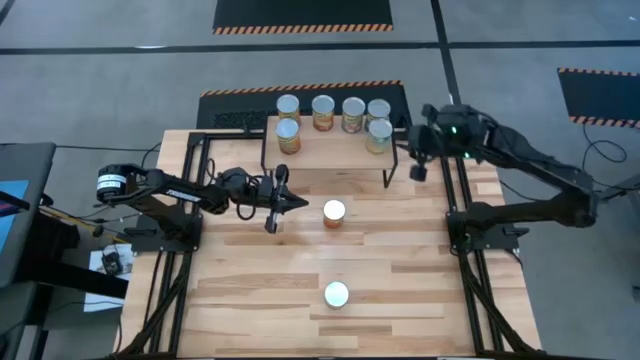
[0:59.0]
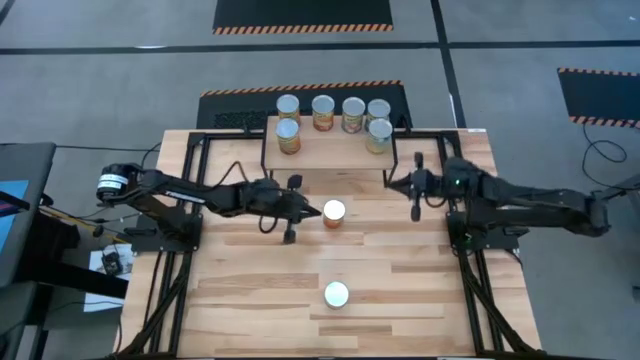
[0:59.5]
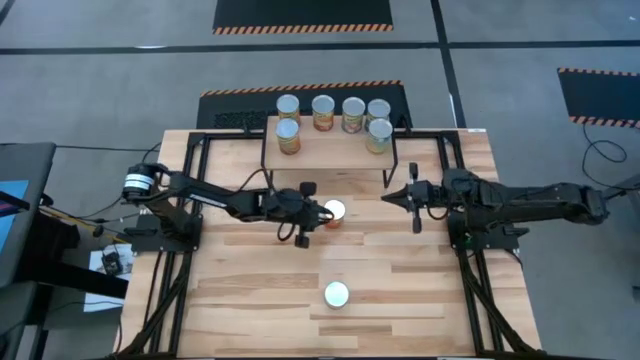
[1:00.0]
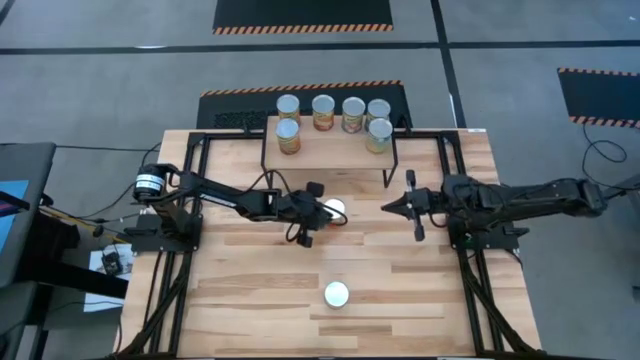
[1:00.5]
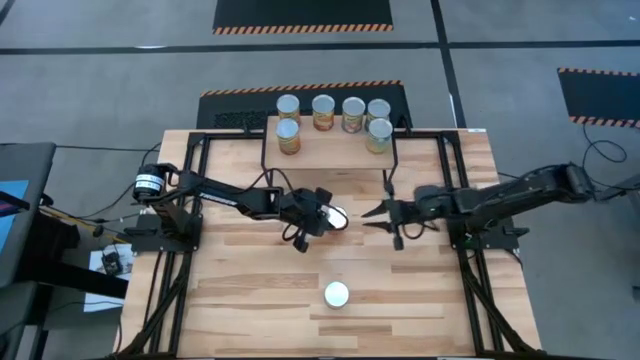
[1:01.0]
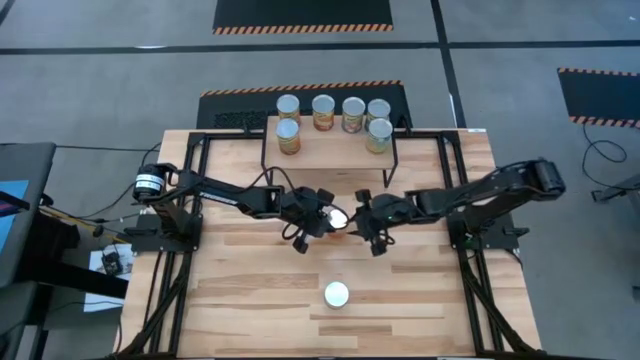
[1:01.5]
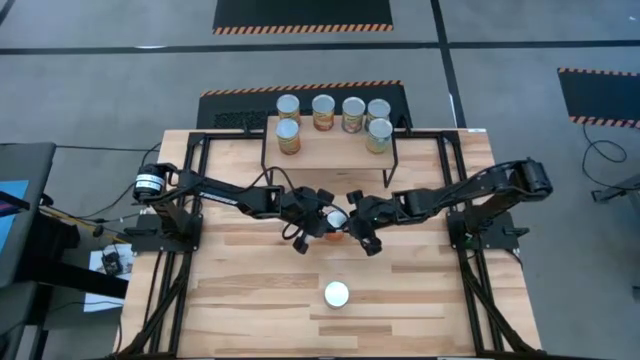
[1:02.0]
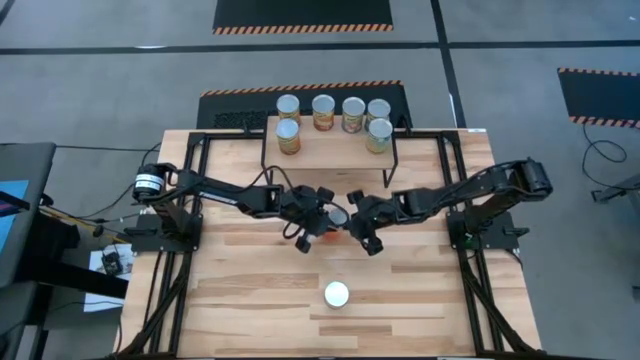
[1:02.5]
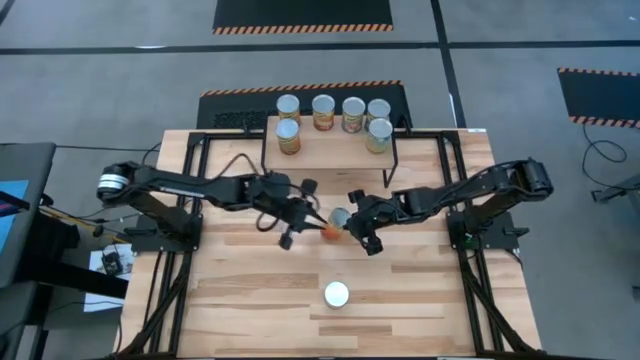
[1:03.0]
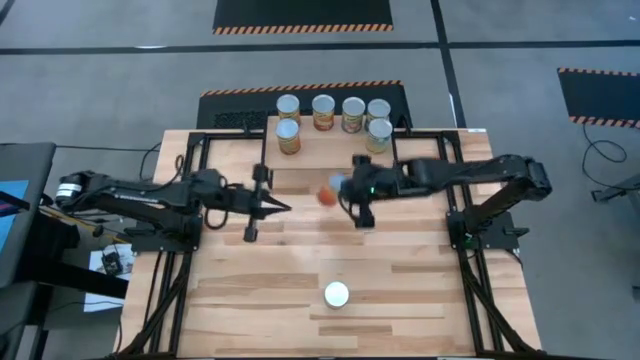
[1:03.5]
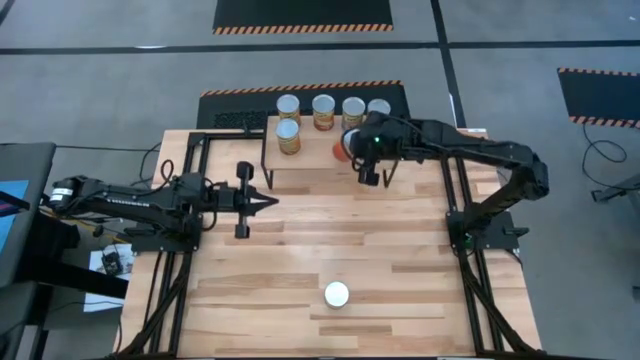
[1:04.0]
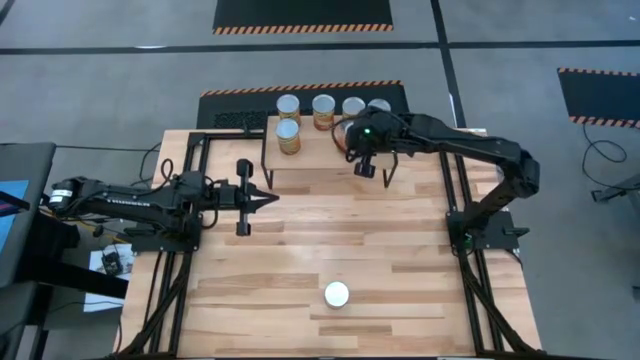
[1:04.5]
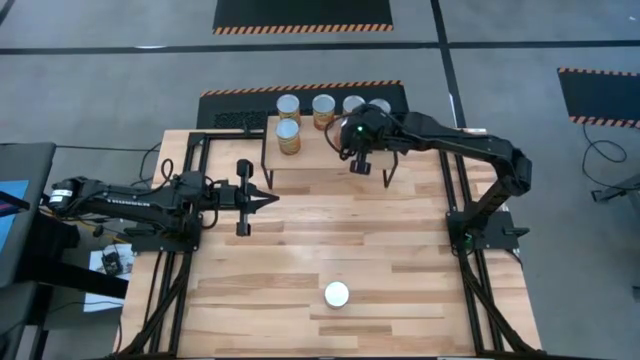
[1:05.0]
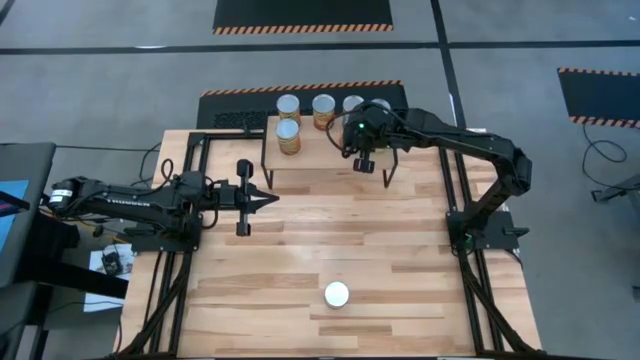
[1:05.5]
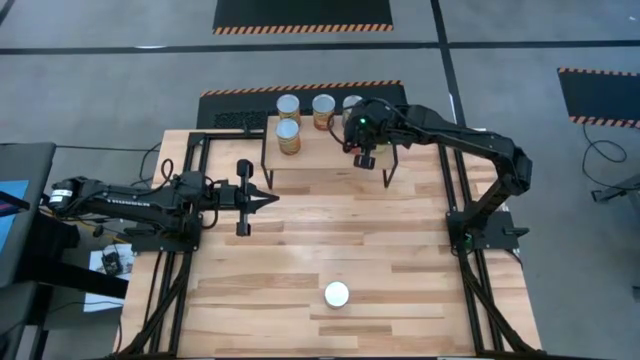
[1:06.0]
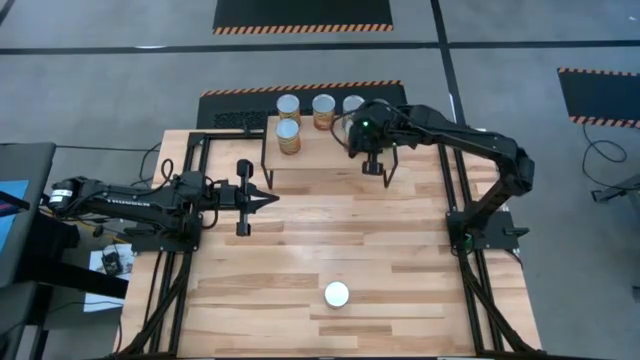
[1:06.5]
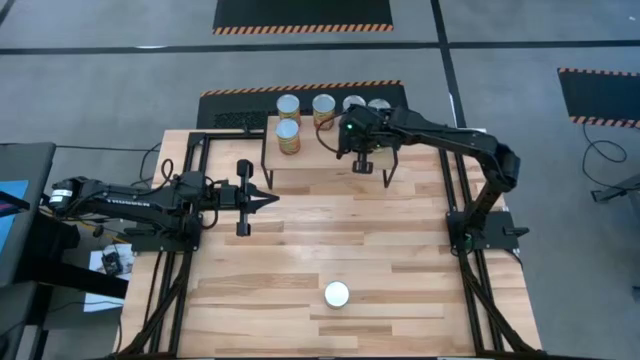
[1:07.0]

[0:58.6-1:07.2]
Task: Pick and place cans onto a shelf
Put the canned pineapple on the shelf

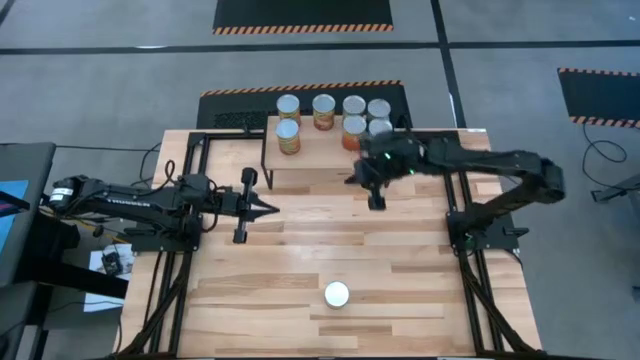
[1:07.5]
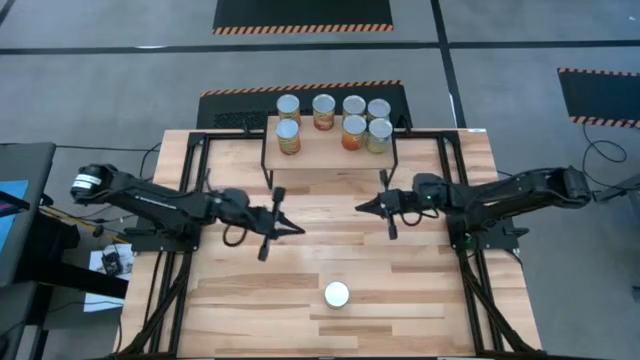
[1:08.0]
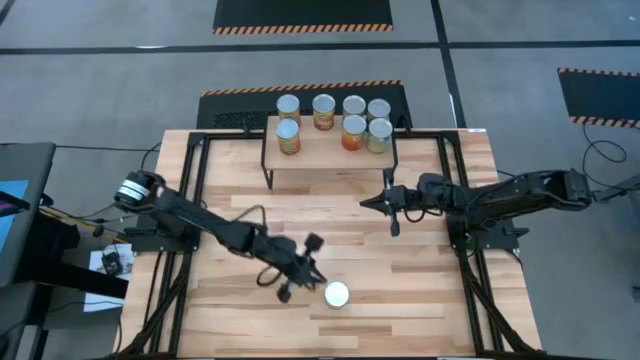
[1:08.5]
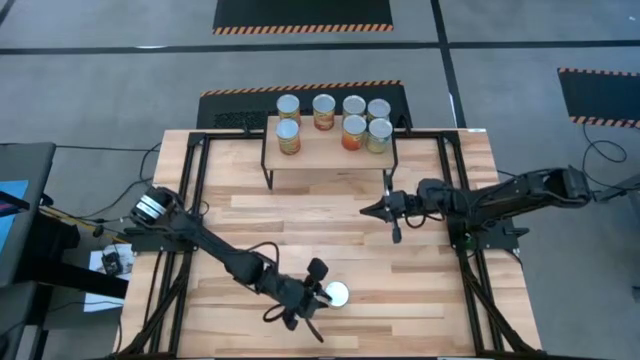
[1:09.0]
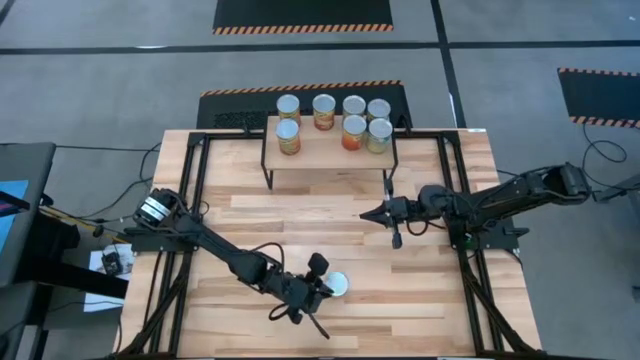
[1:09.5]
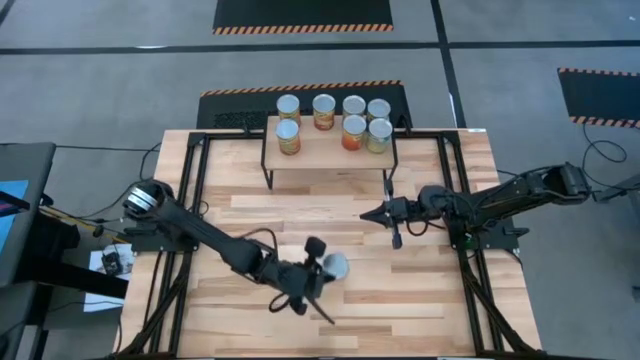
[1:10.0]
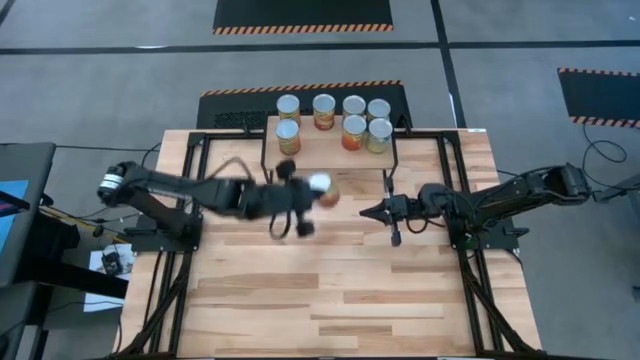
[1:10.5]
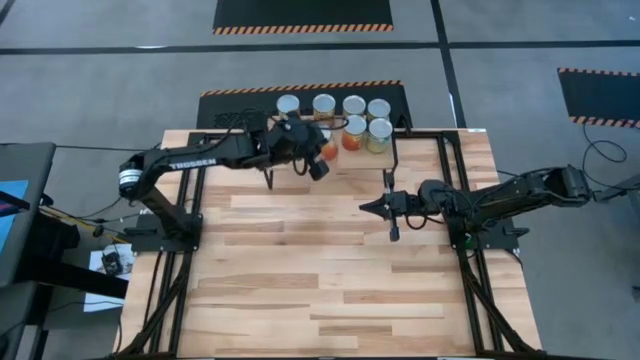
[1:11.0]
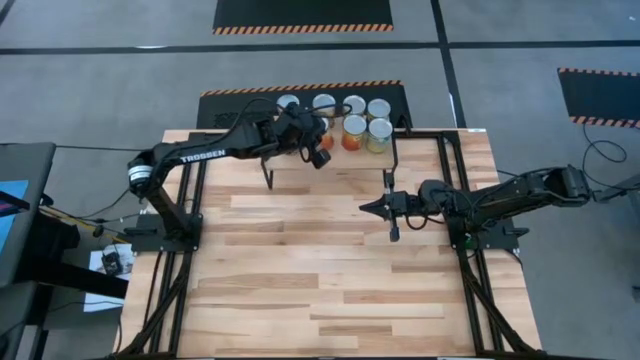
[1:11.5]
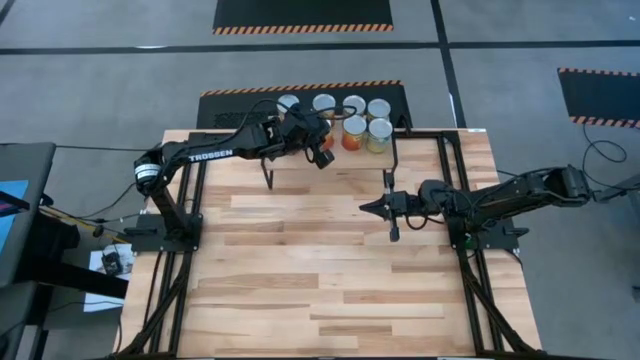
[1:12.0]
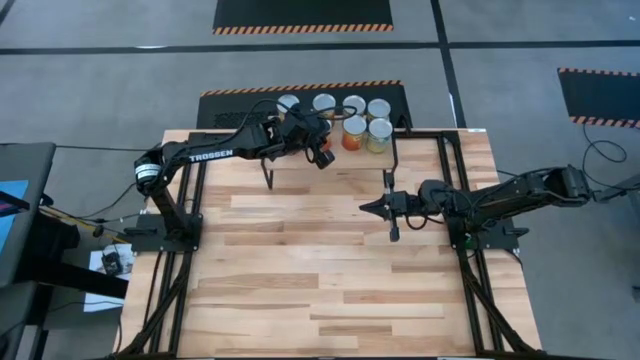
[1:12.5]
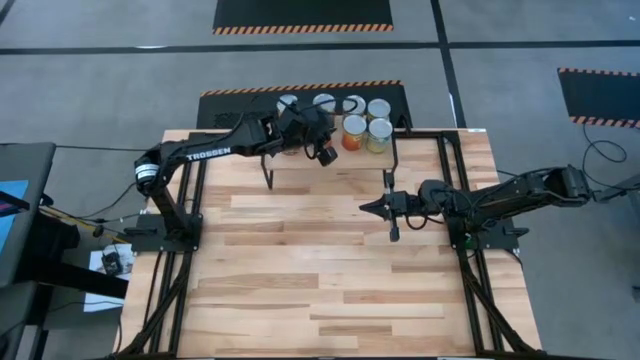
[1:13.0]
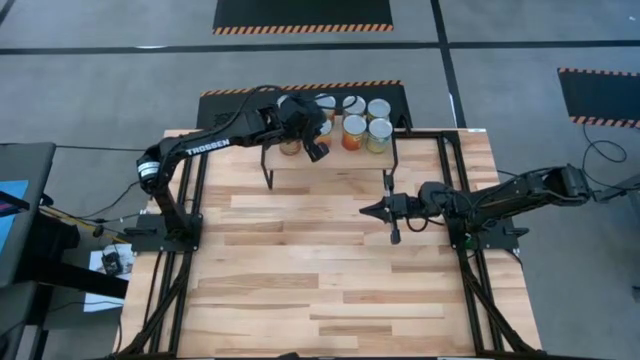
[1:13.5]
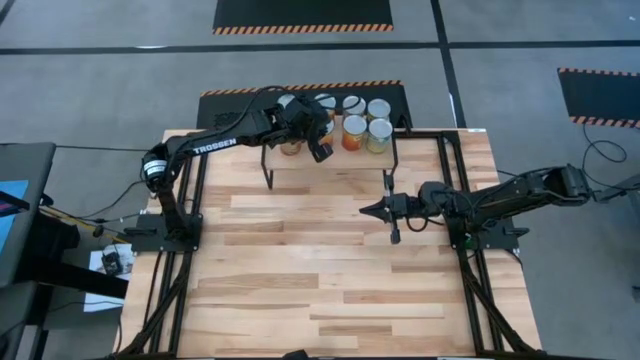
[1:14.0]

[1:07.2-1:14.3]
Put the canned corn on the shelf

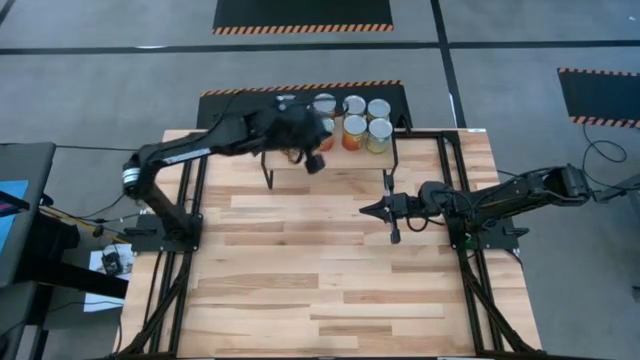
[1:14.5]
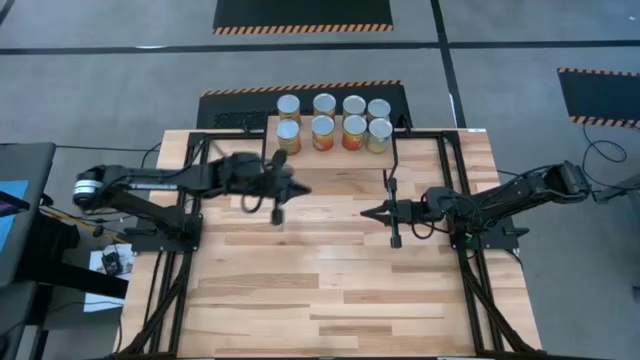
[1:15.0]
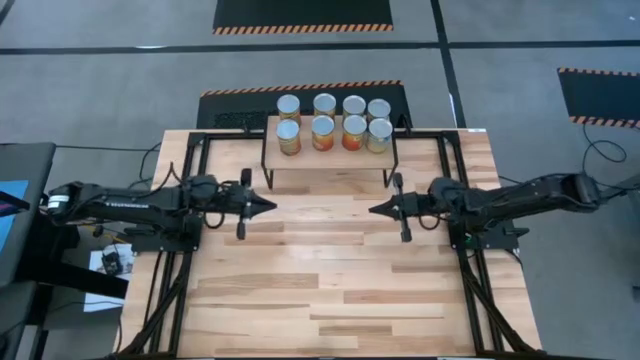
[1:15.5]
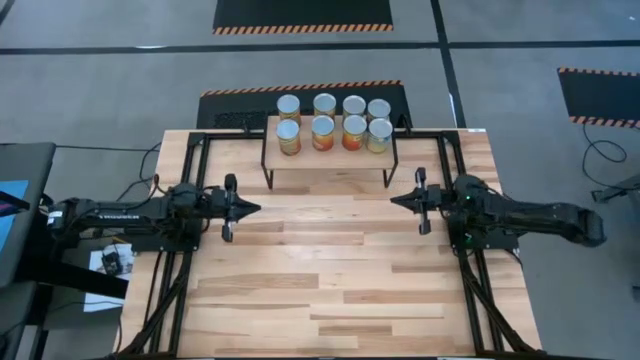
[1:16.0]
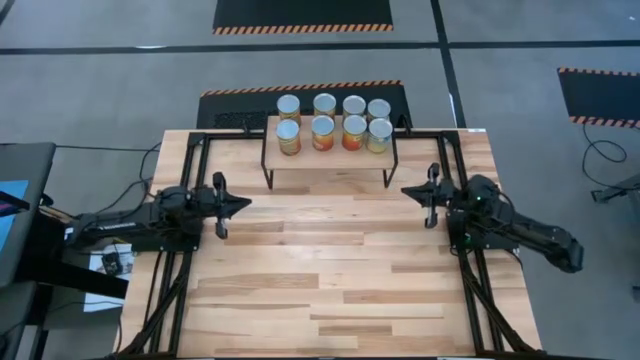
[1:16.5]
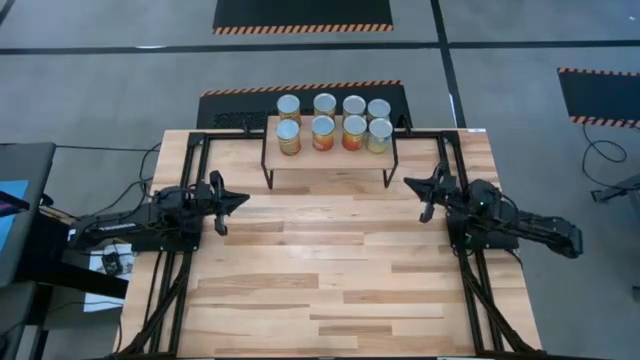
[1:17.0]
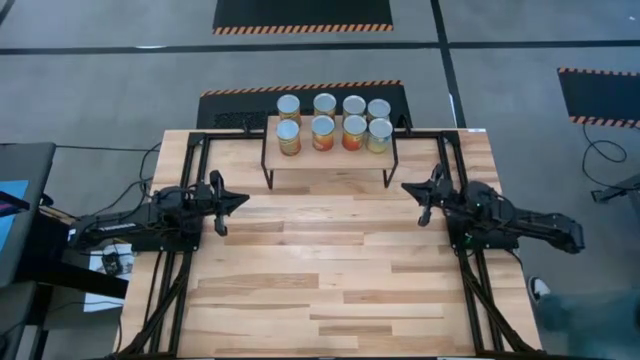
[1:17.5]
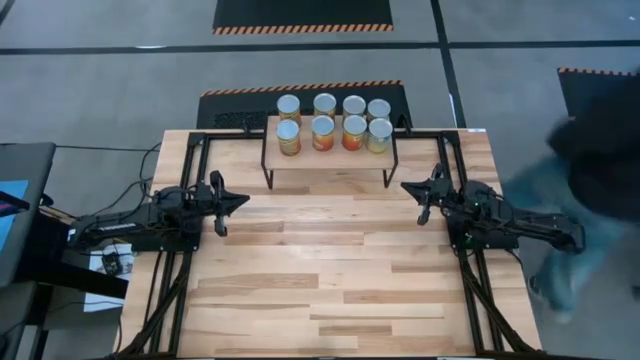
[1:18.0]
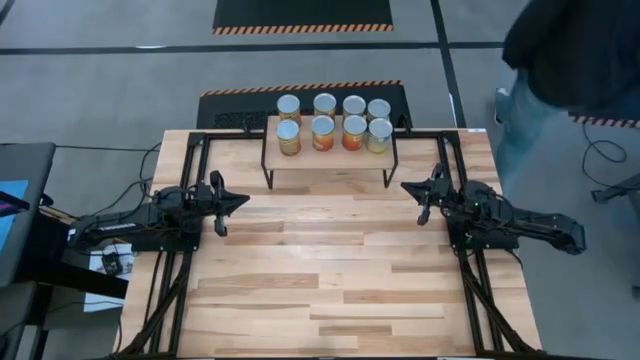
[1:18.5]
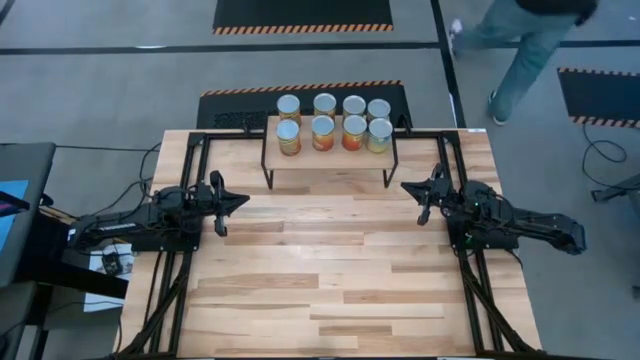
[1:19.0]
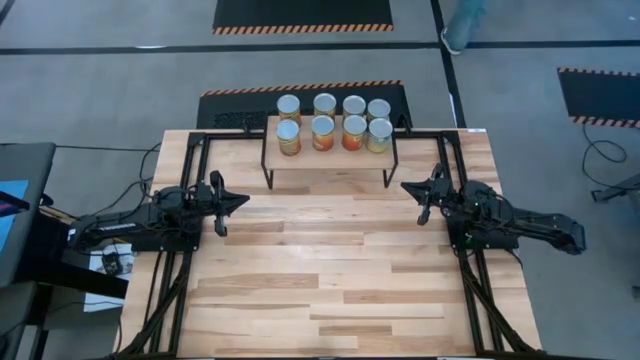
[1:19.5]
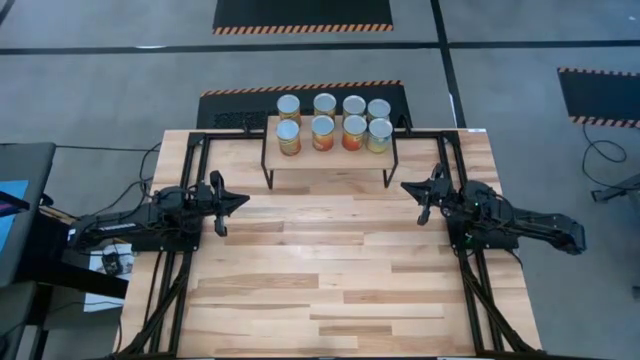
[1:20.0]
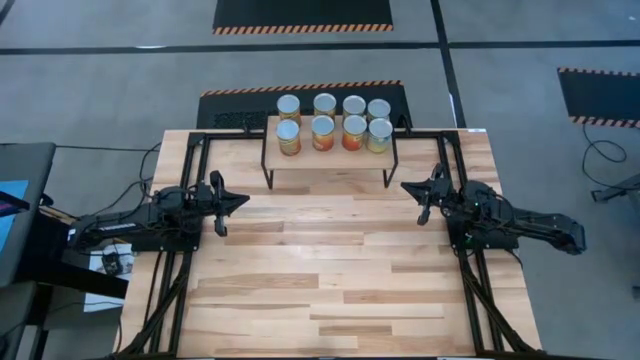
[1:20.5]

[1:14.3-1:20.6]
Return to Home Position
